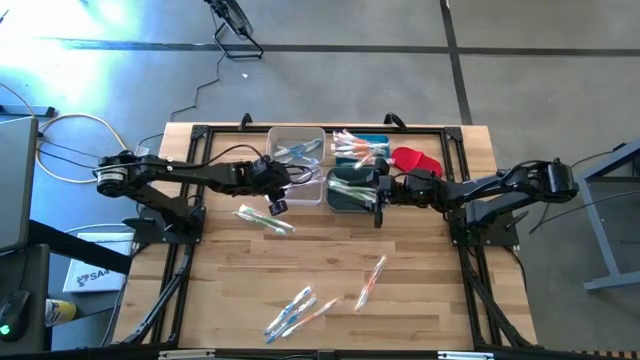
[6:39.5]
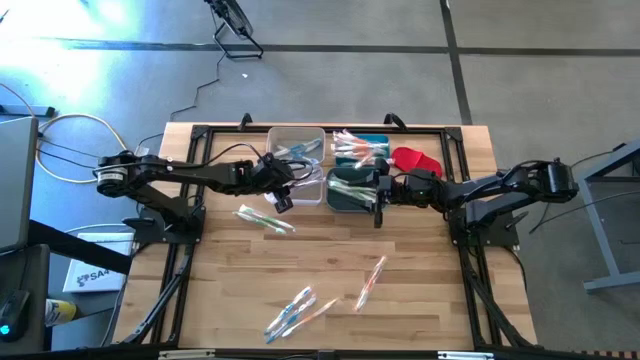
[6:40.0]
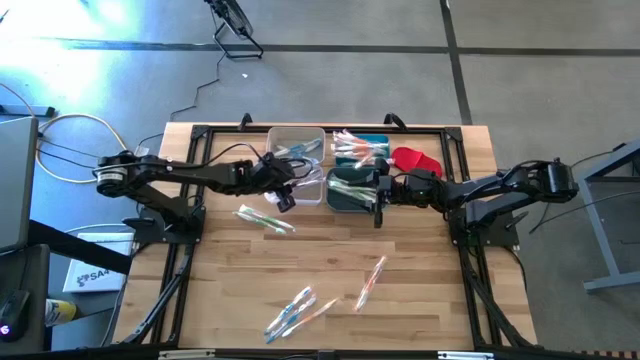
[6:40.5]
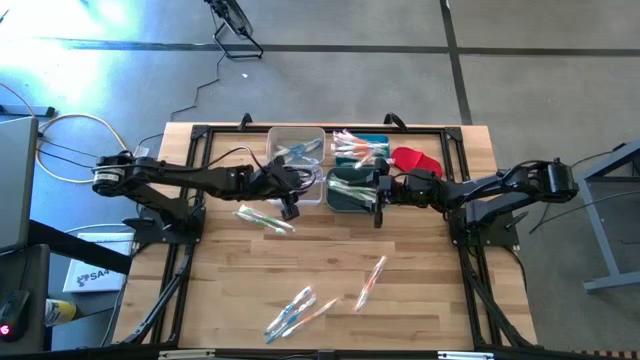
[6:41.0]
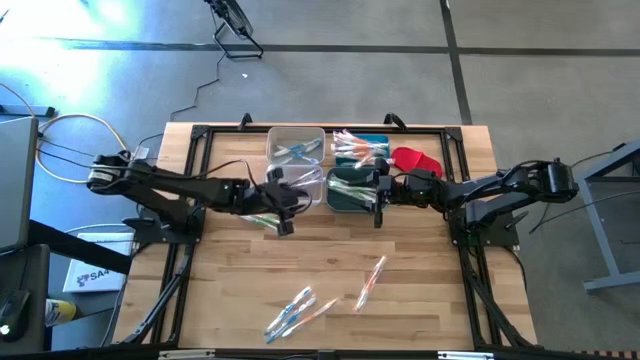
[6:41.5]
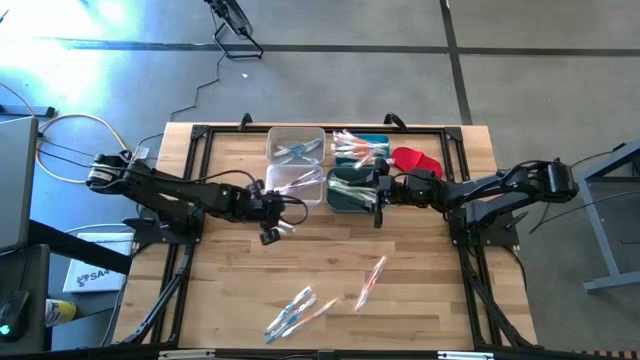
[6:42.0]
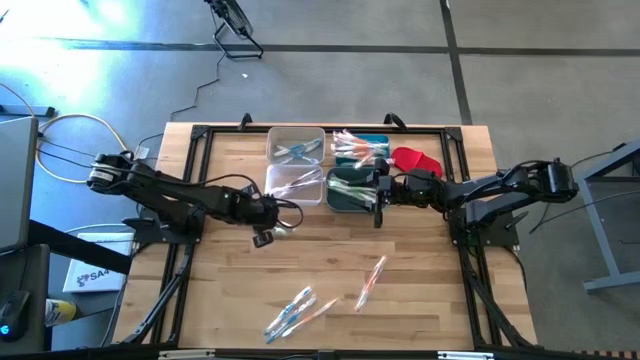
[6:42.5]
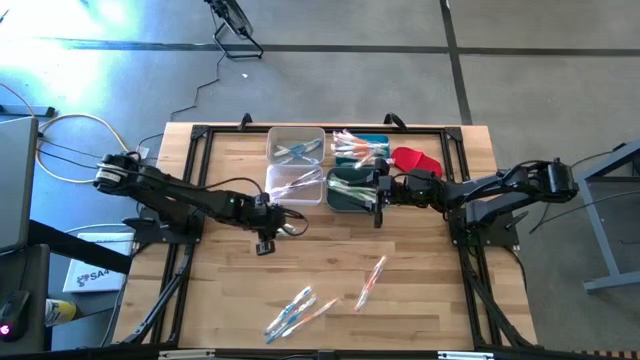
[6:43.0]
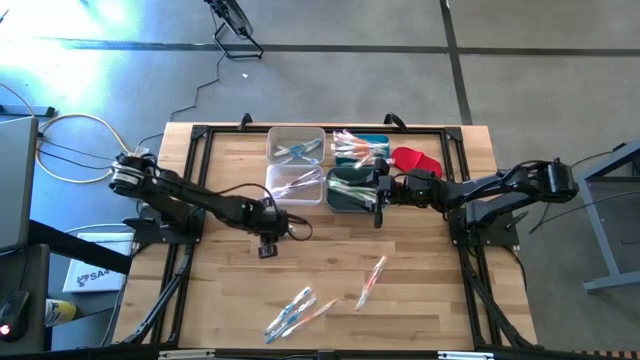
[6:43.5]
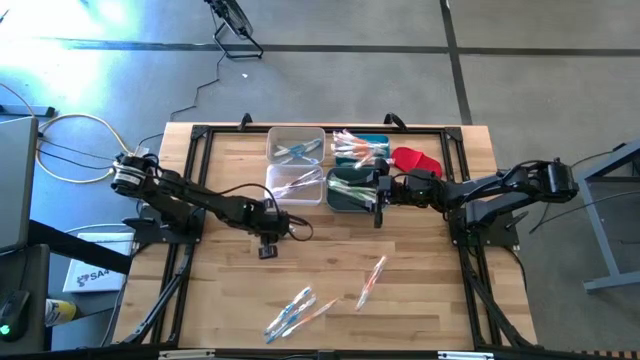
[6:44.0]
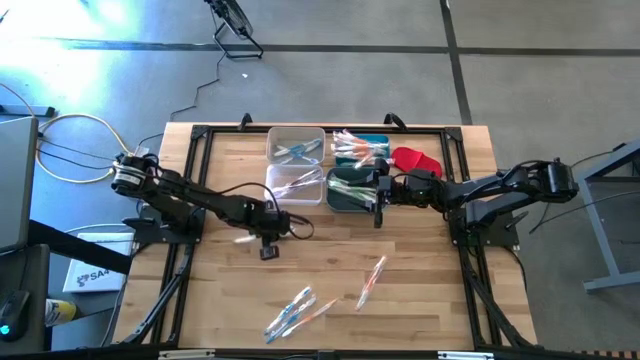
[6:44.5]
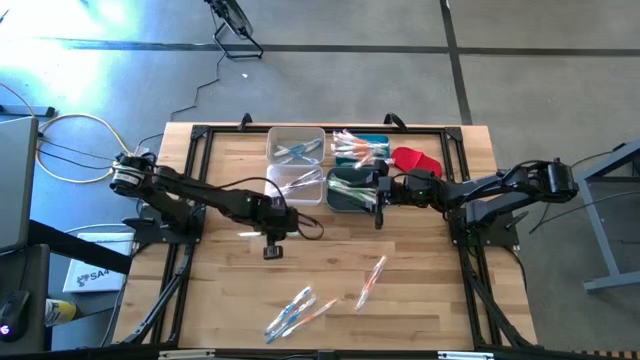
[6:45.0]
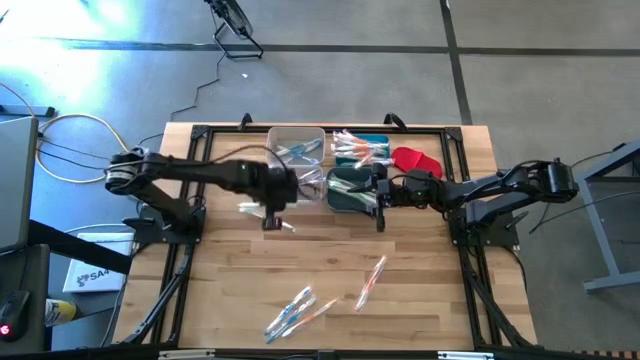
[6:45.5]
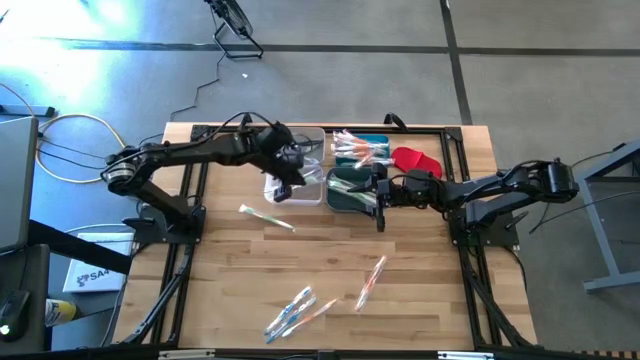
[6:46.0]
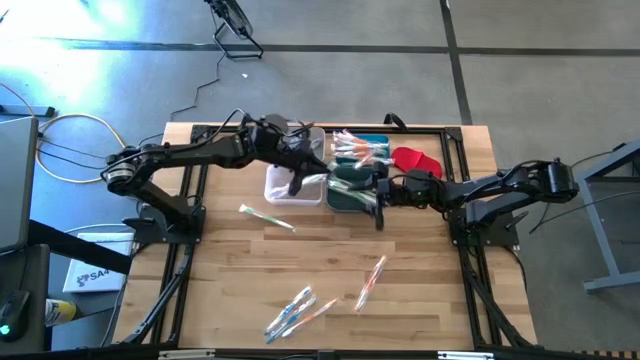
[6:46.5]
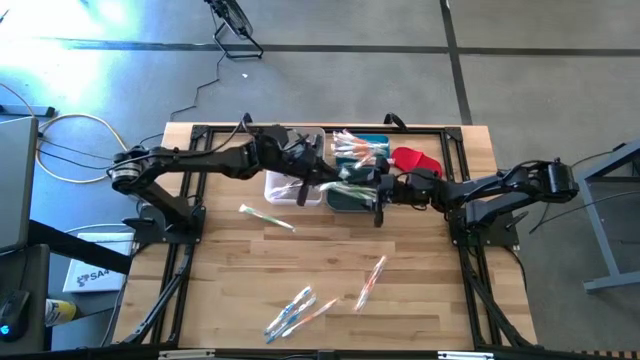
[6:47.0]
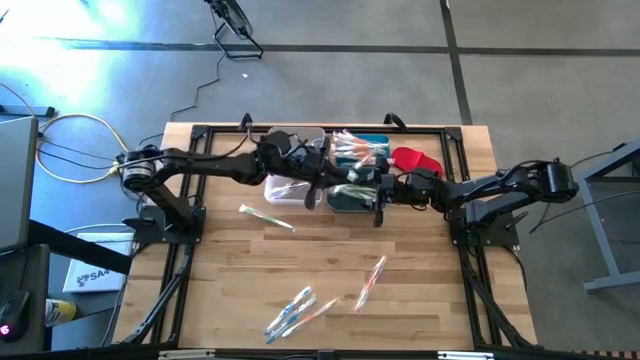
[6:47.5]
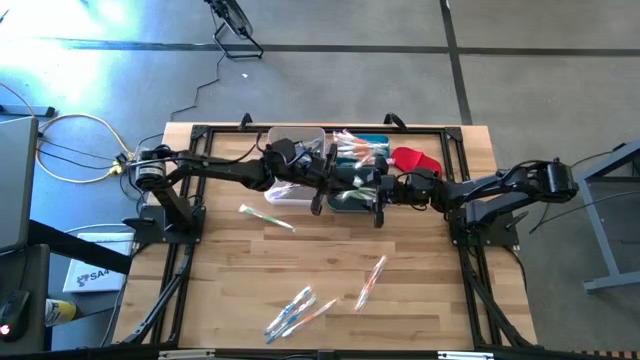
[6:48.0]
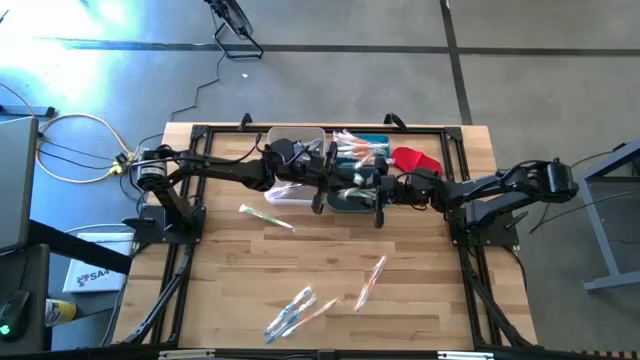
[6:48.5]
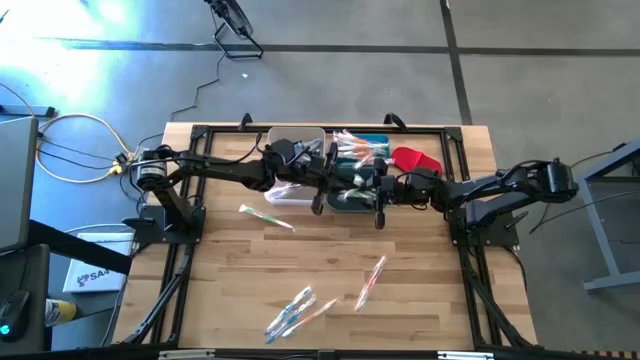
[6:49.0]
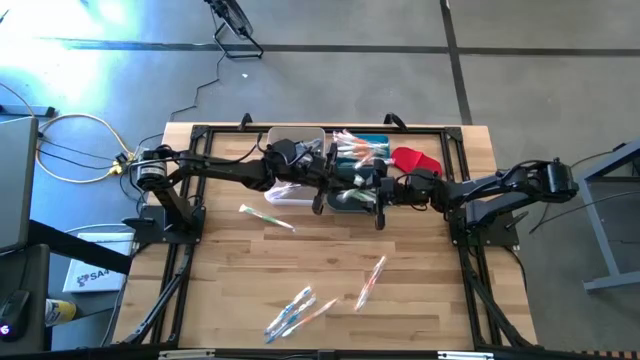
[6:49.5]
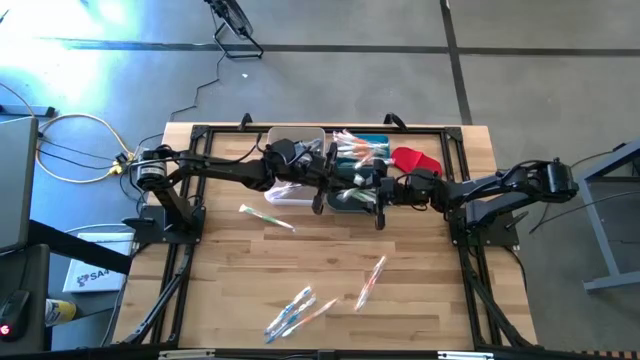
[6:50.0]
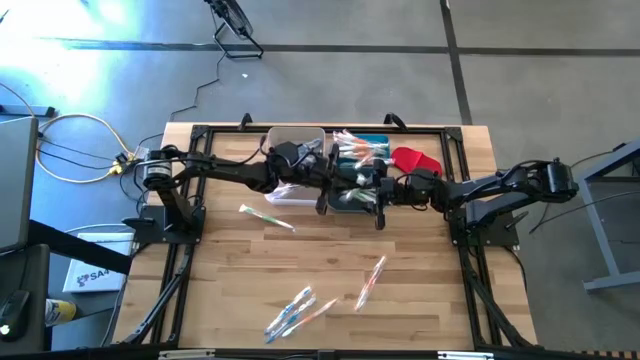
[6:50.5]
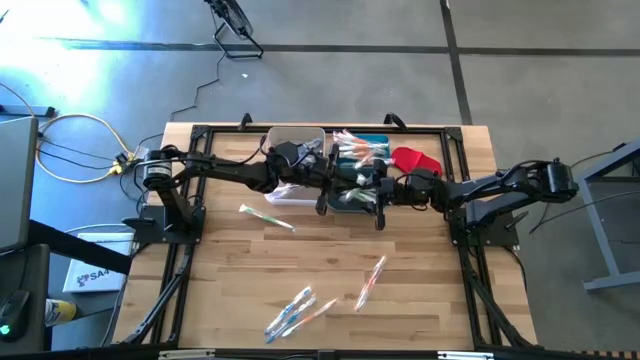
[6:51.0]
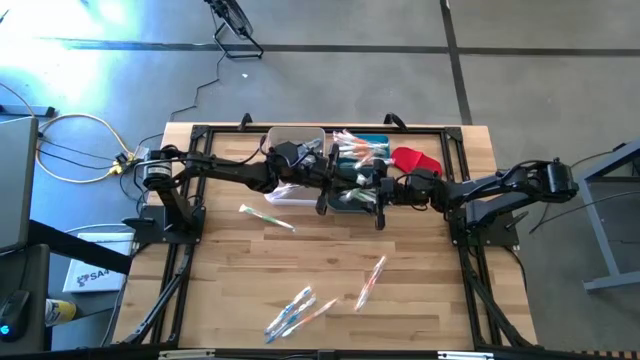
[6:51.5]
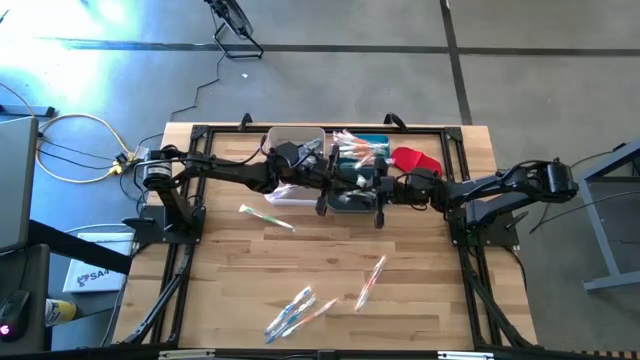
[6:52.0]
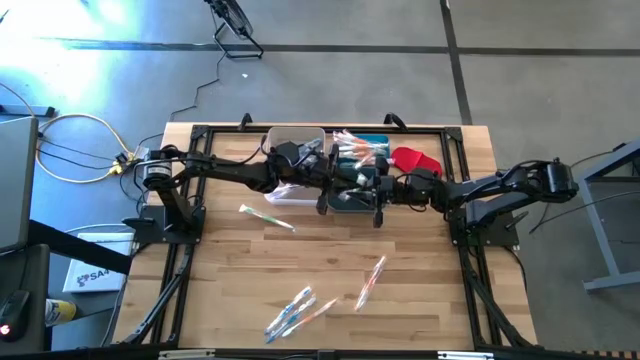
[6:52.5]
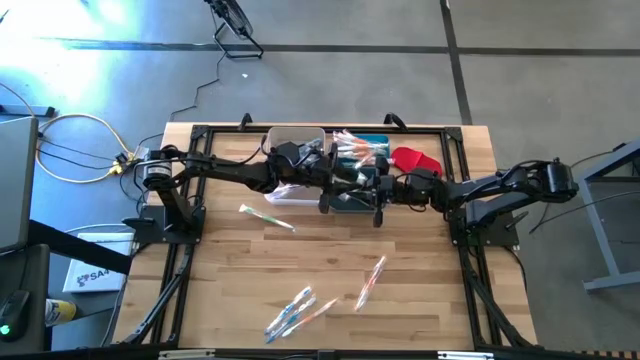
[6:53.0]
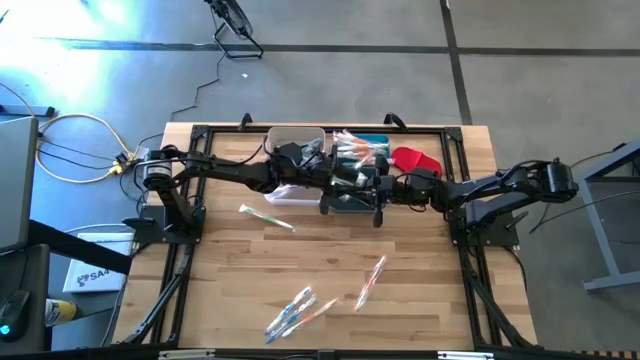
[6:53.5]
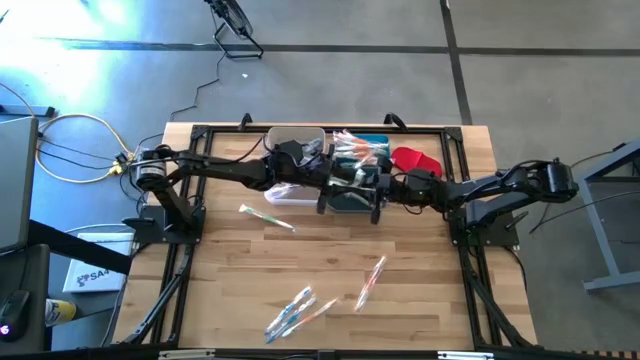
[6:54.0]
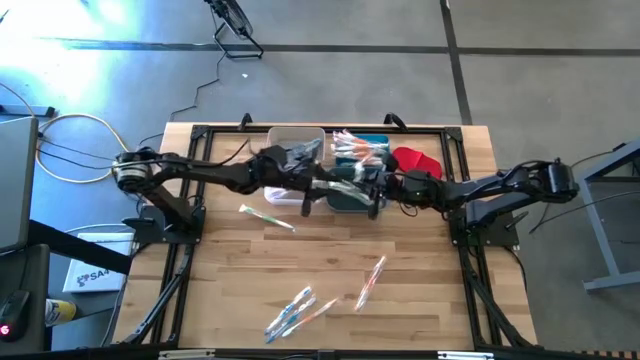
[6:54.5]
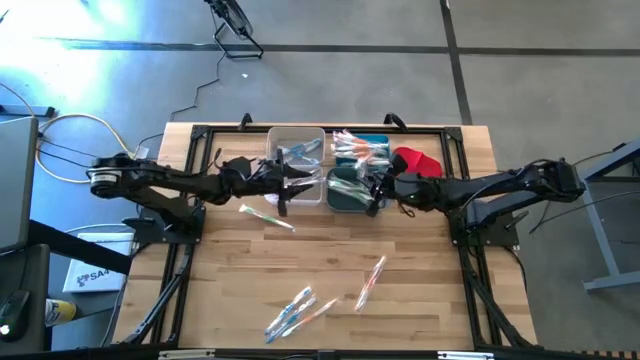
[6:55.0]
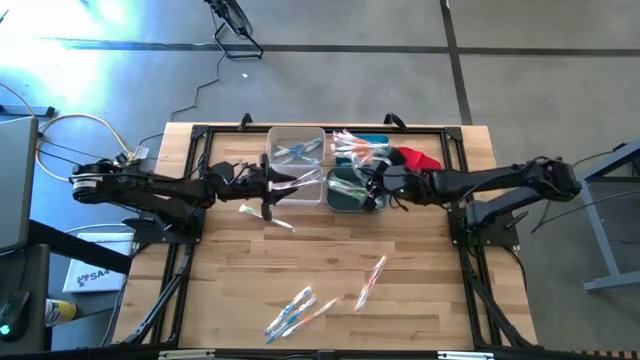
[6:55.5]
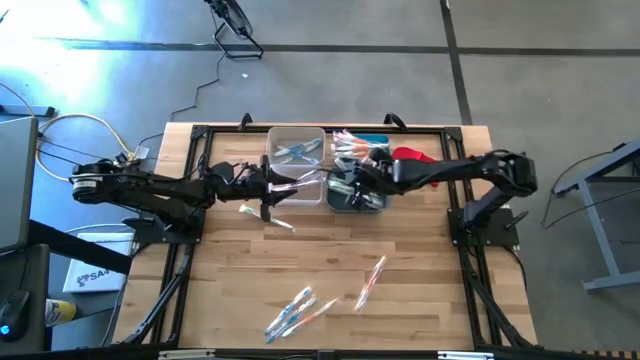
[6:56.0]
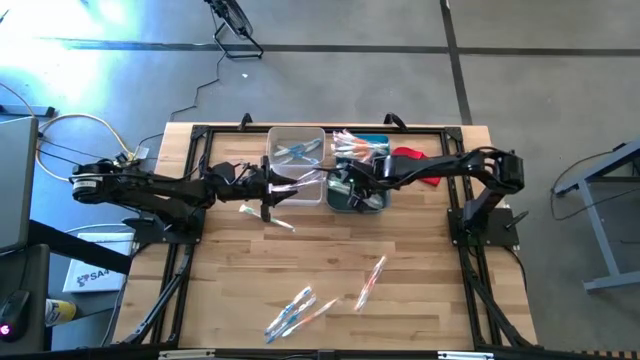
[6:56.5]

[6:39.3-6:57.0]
Task: Pick & Place Toothbrushes
Put the green toothbrush into the green bin

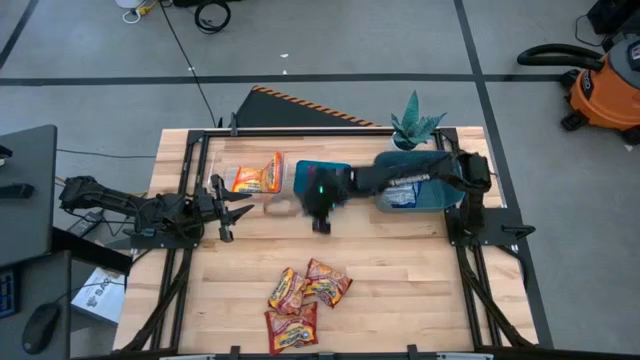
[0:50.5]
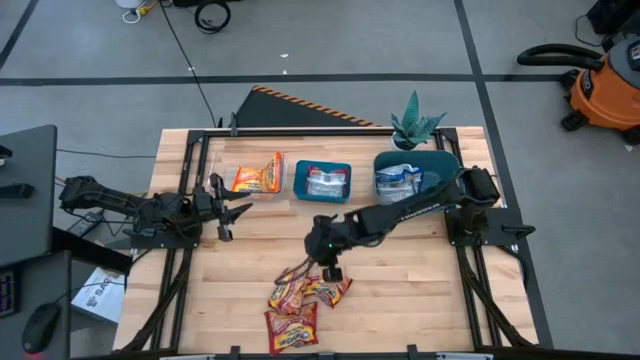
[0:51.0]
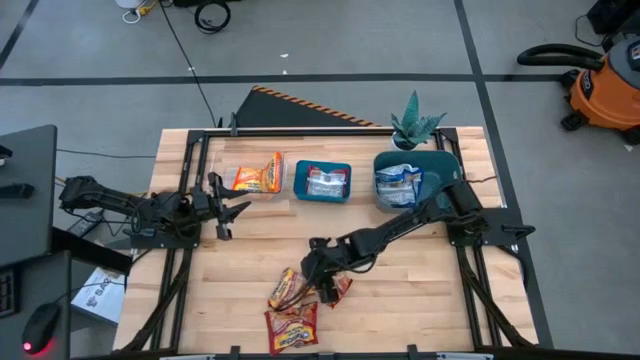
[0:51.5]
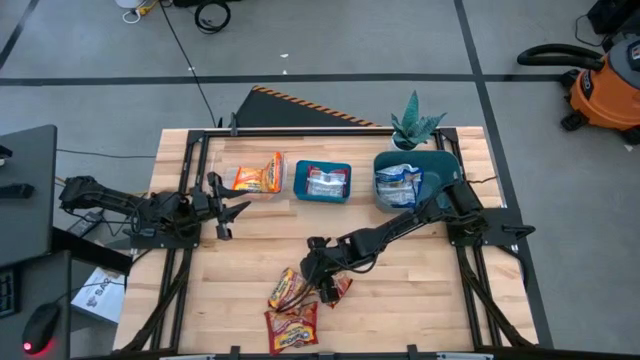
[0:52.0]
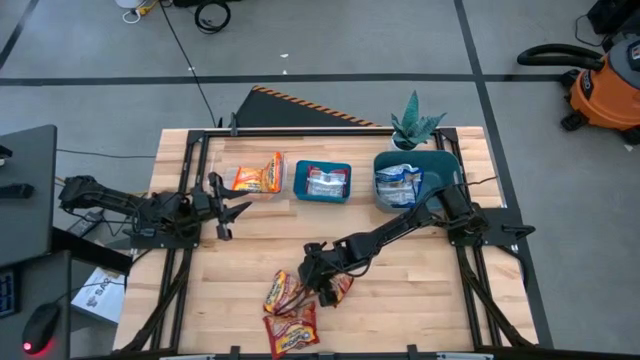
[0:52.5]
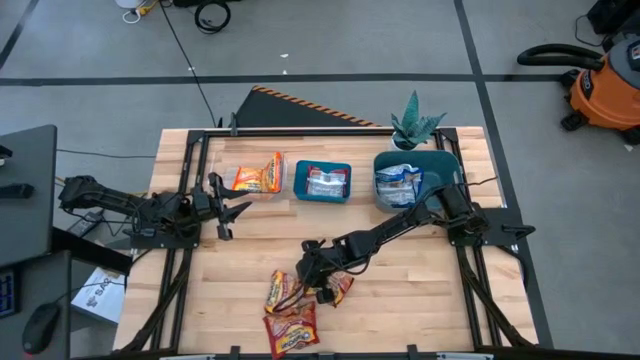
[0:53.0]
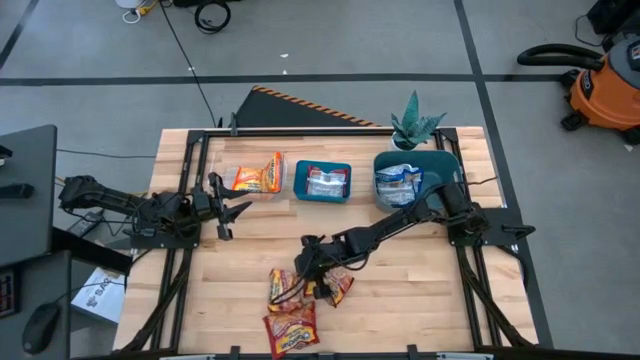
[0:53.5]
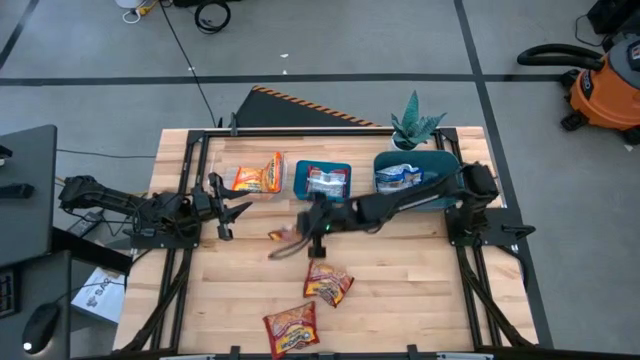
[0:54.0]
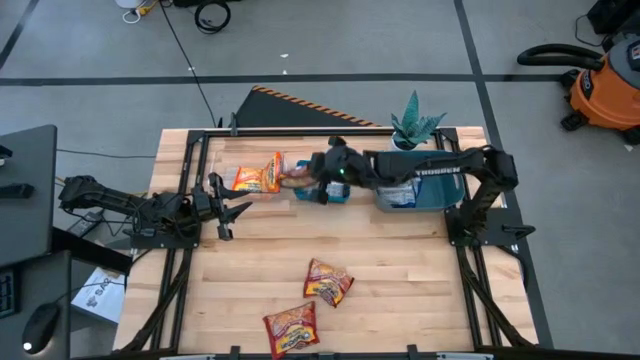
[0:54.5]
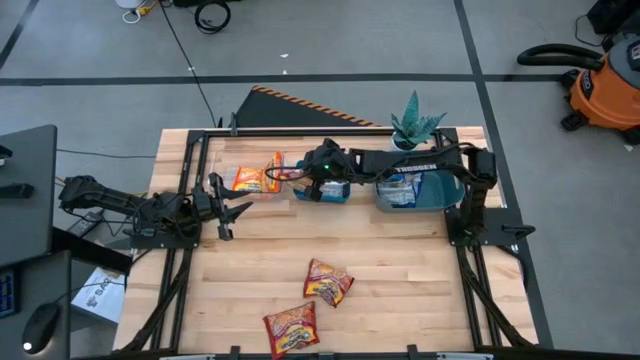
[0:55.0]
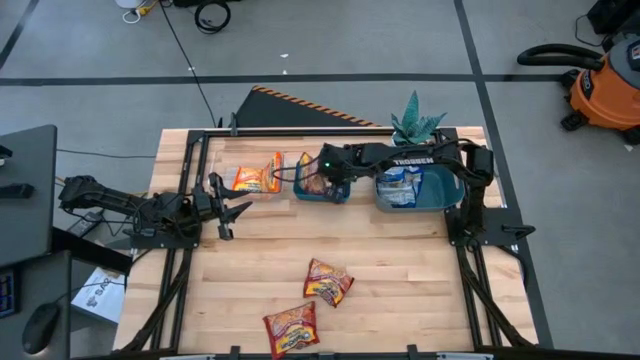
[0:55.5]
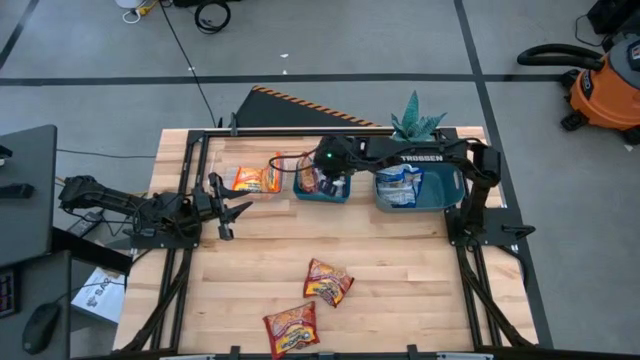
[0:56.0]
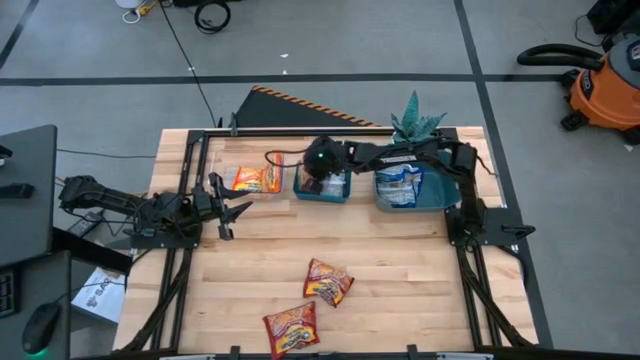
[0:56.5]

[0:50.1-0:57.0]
Task: Sort Maruchan noodles
Put the red noodle pack into the blue bin
